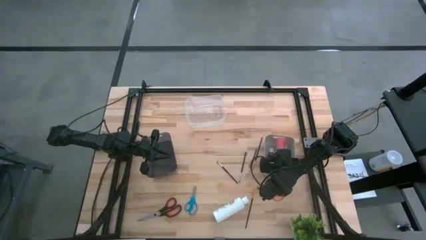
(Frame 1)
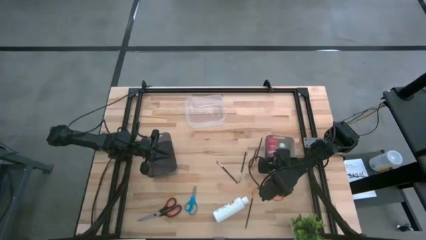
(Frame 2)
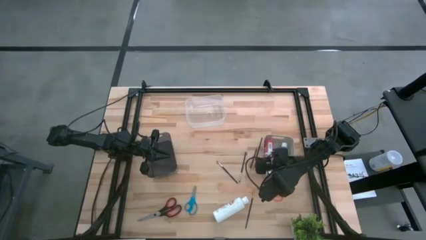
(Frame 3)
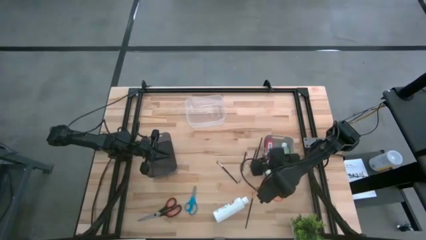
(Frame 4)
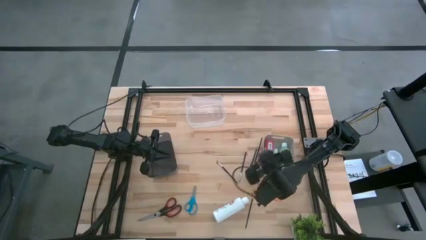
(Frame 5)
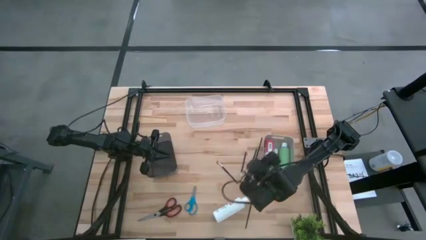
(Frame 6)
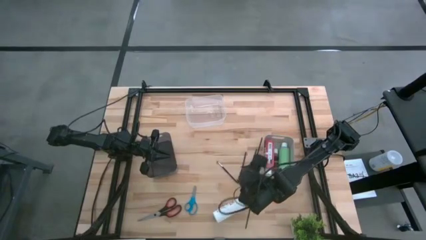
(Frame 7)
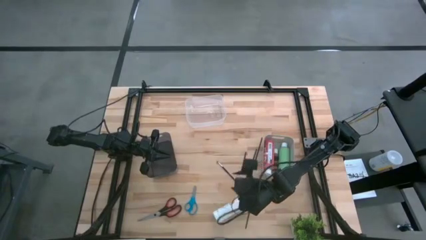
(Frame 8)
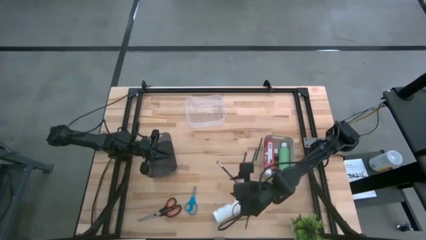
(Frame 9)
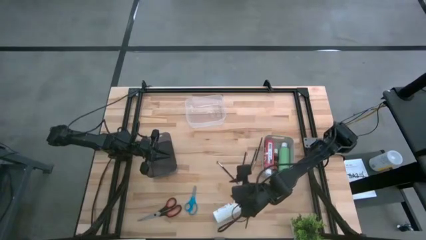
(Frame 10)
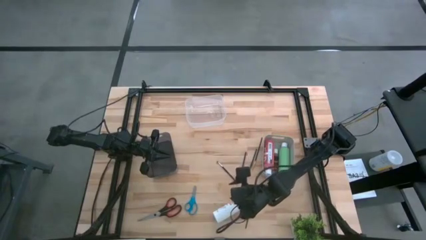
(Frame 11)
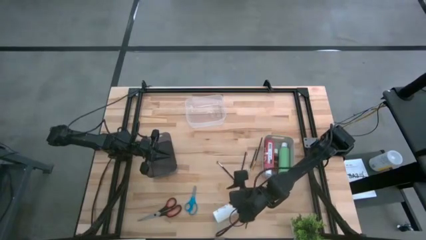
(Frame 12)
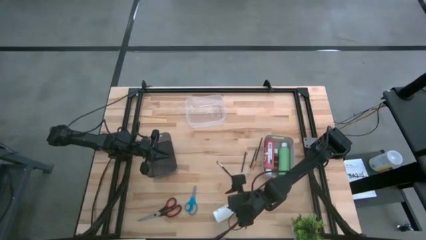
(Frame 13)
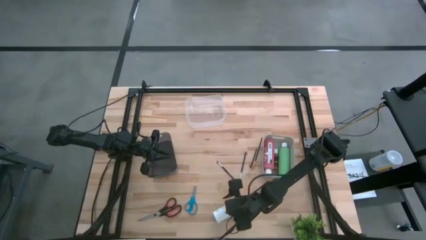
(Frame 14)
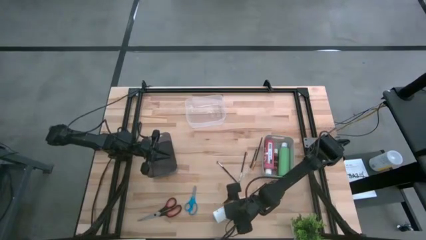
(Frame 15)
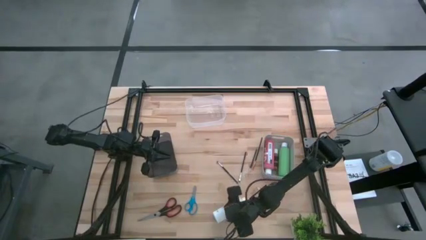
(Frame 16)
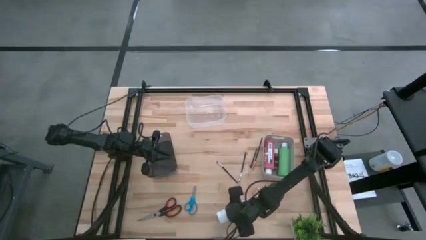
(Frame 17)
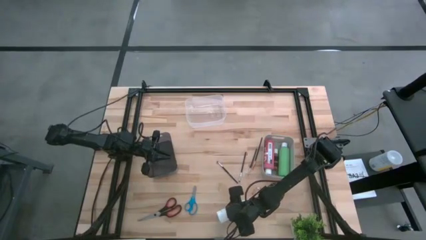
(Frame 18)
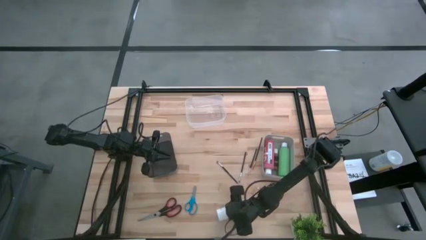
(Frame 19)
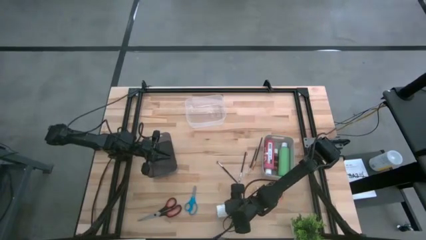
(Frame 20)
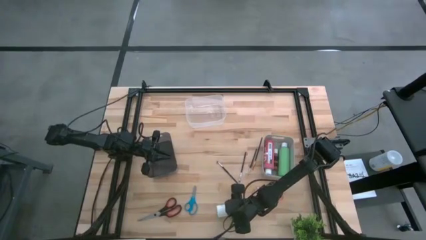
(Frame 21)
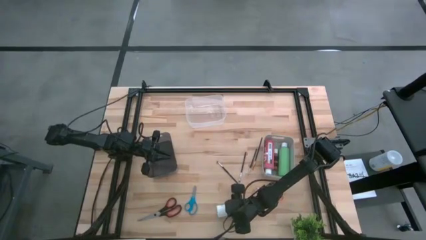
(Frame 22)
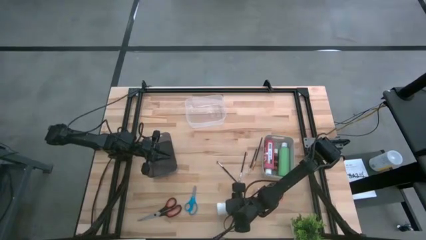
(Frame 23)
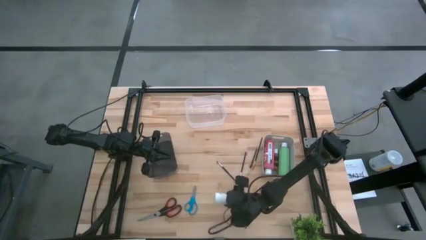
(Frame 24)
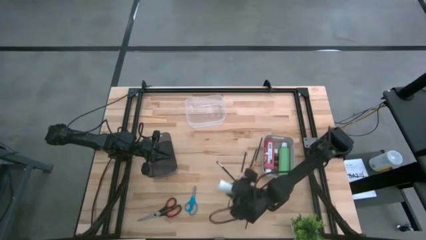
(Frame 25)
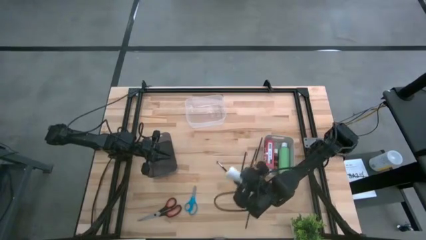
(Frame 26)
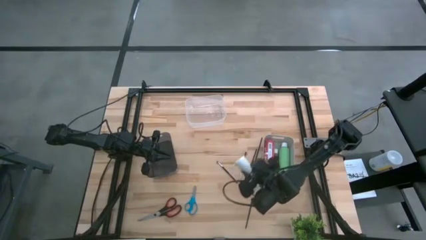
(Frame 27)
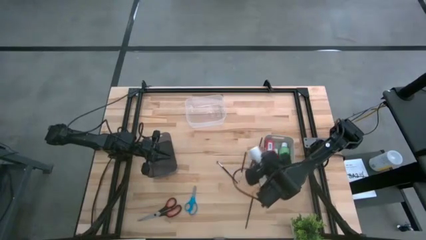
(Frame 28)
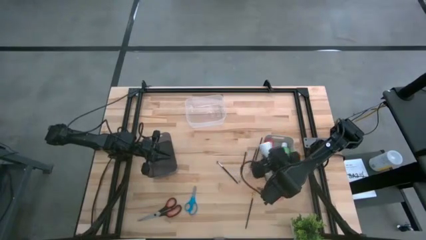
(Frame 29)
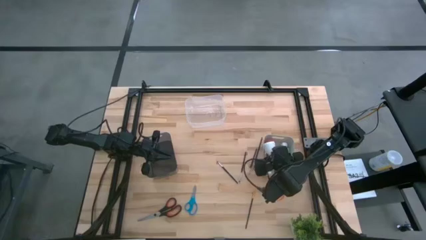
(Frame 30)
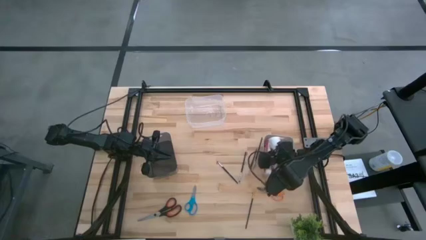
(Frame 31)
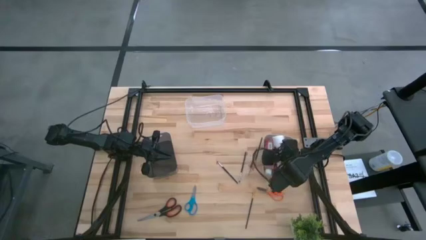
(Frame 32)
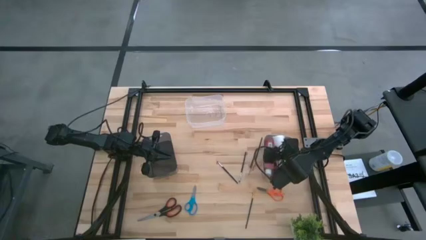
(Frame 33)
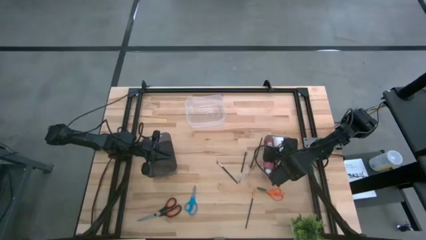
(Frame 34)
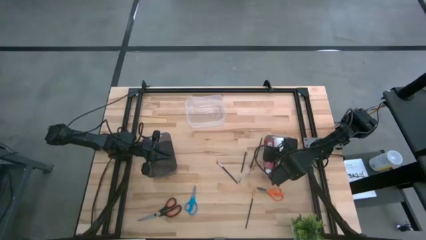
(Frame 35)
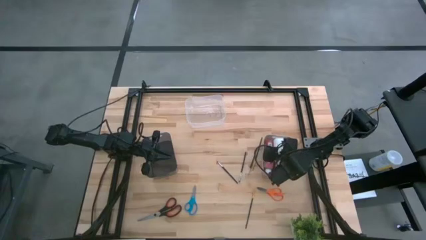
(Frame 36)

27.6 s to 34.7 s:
Task: Pick & Place Paint Supplies
Put the white paint bottle into the gray bin

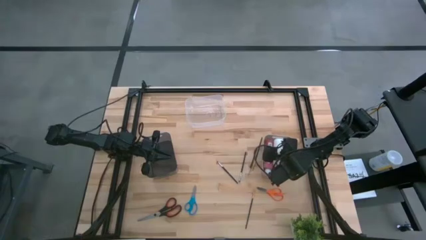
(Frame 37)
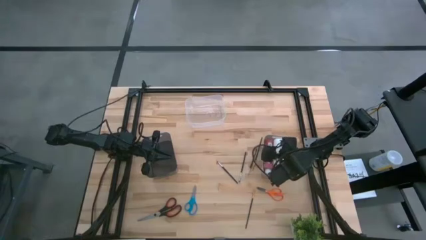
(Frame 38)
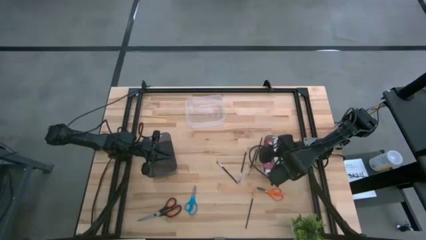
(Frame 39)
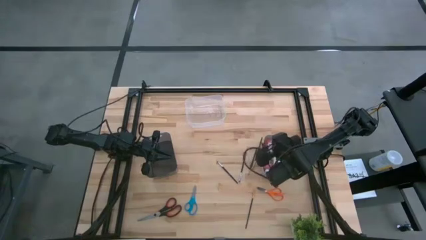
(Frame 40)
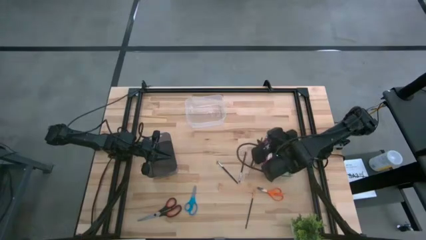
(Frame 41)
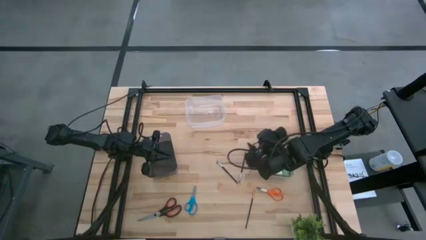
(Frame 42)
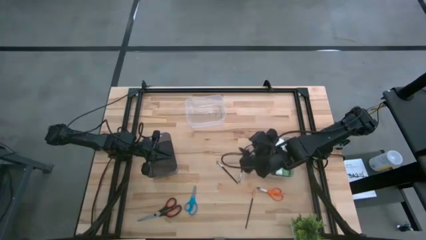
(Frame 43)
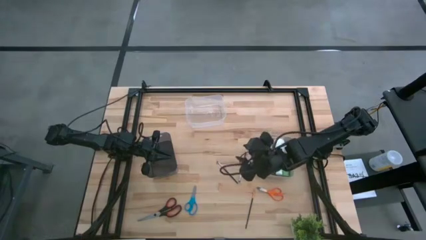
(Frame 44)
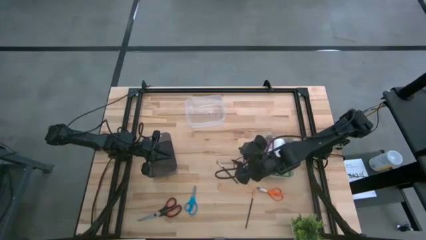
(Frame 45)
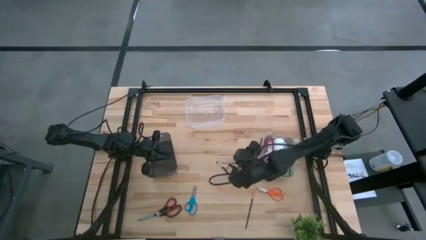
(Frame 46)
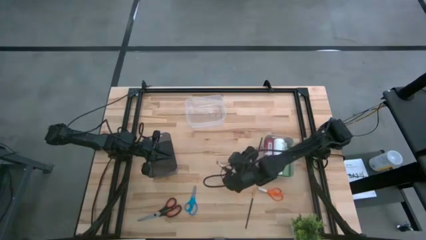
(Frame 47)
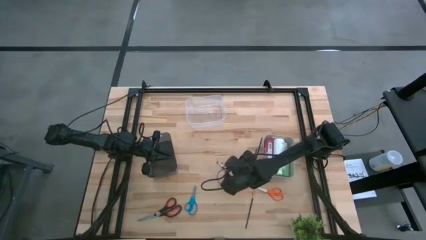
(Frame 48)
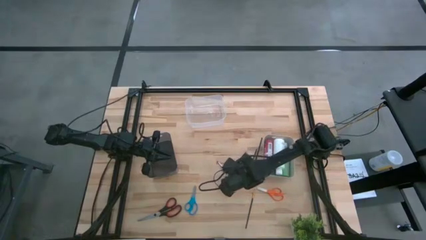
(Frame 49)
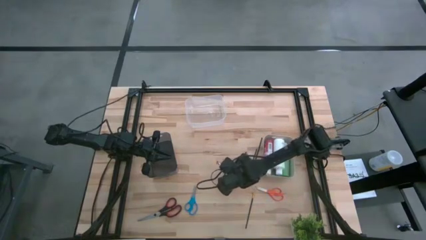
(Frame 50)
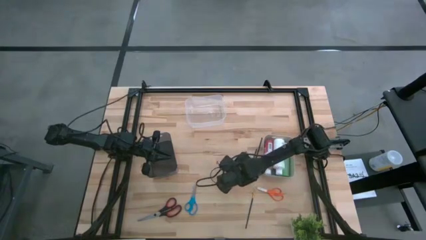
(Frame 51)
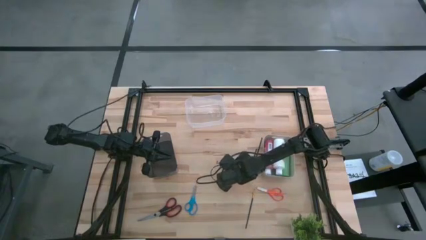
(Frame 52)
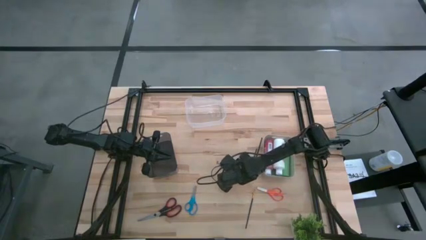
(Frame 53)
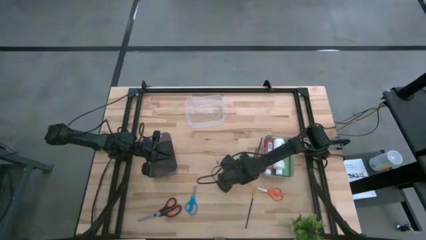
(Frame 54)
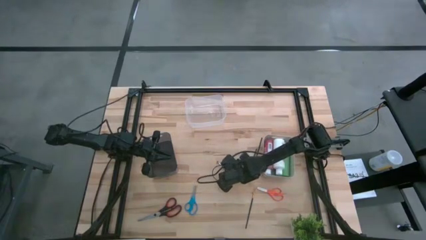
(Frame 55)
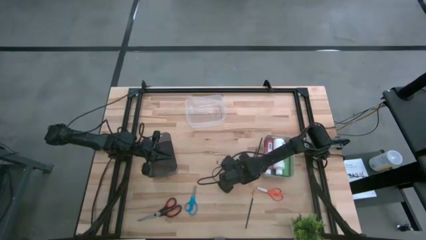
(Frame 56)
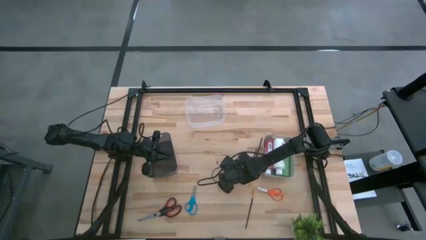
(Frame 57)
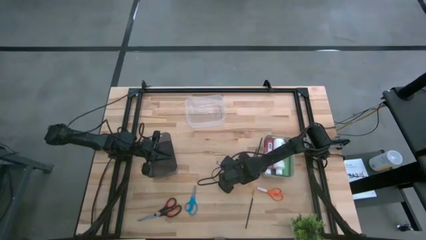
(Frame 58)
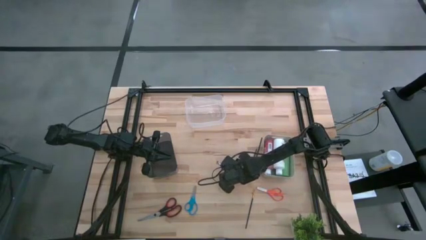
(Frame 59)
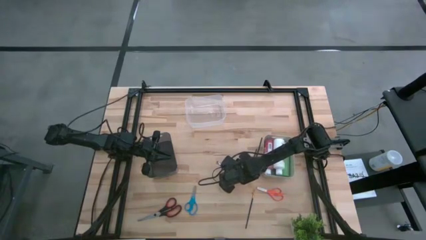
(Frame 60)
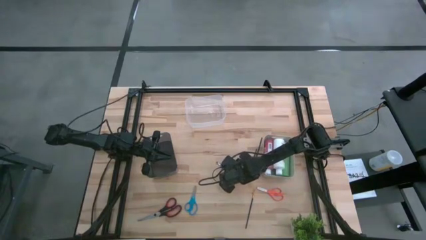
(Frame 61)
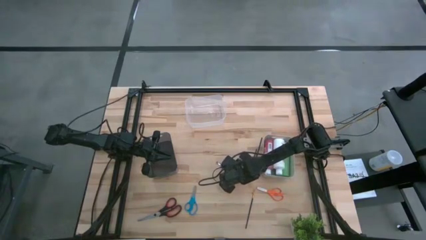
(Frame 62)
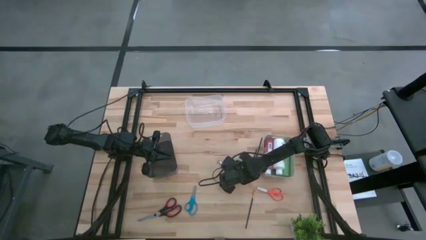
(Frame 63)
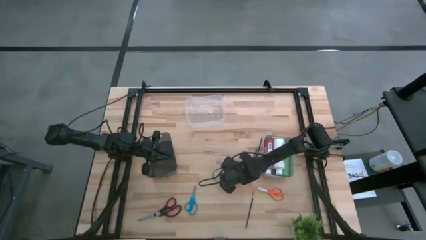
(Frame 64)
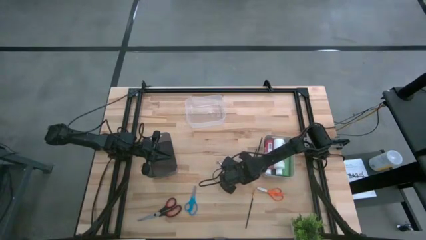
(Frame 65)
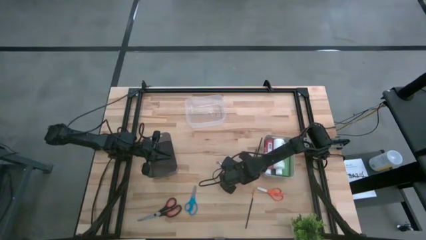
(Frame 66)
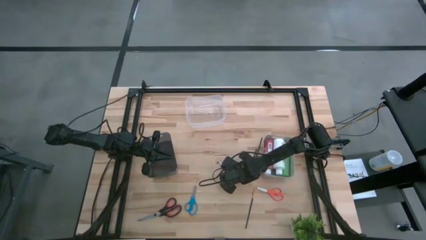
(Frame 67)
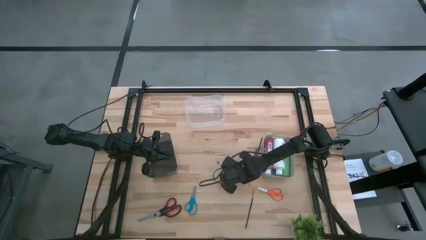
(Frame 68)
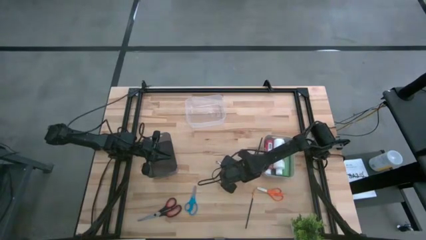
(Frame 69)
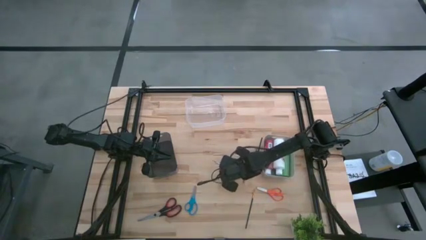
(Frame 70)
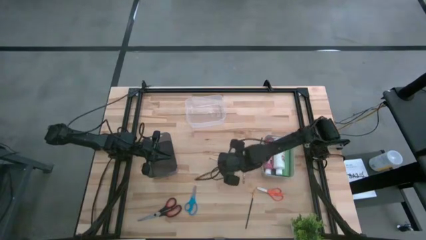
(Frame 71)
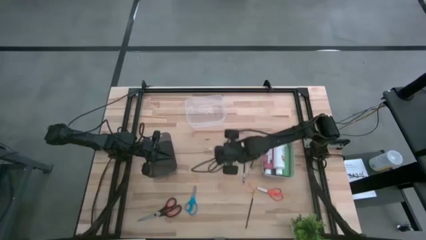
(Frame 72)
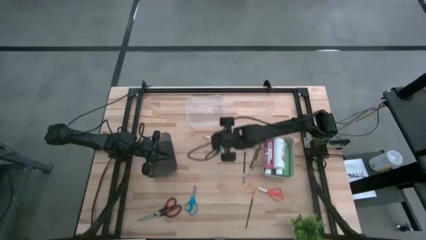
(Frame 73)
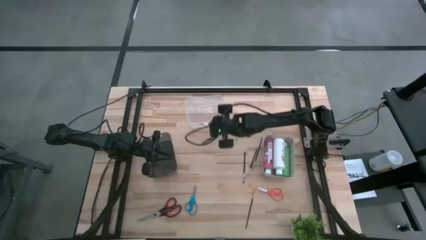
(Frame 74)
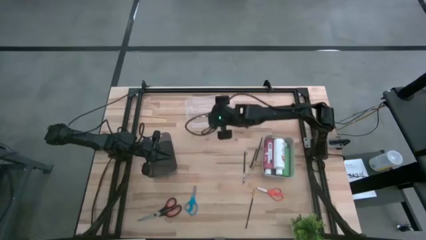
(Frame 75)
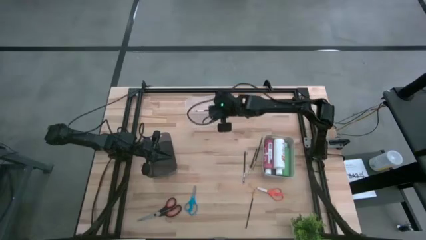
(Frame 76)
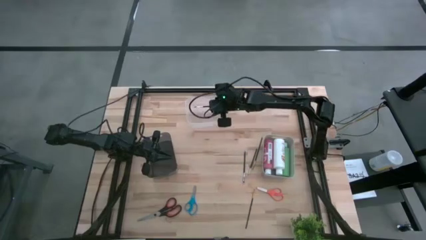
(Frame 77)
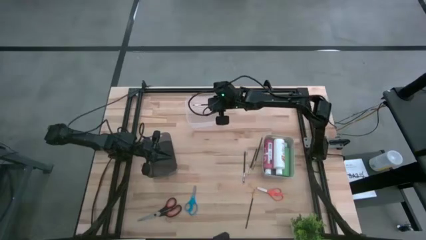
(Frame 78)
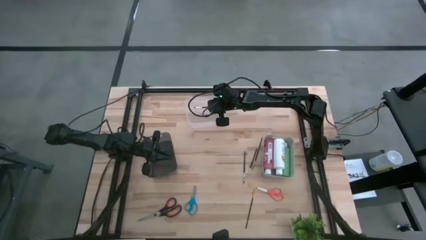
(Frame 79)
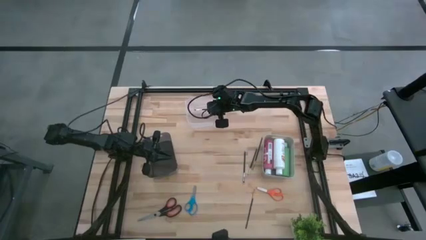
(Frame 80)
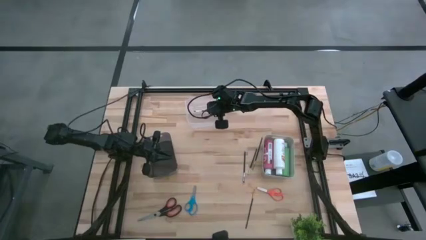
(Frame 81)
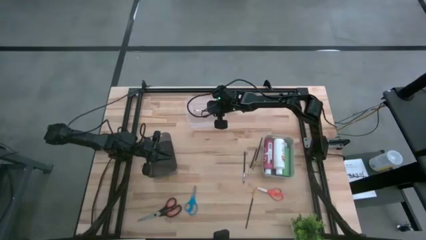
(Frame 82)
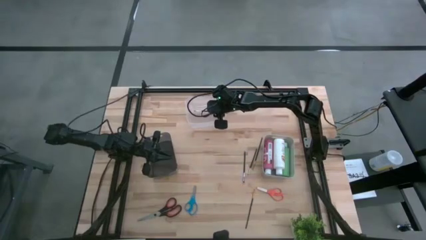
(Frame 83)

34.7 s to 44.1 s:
Put the silver paint brush into the transparent bin
